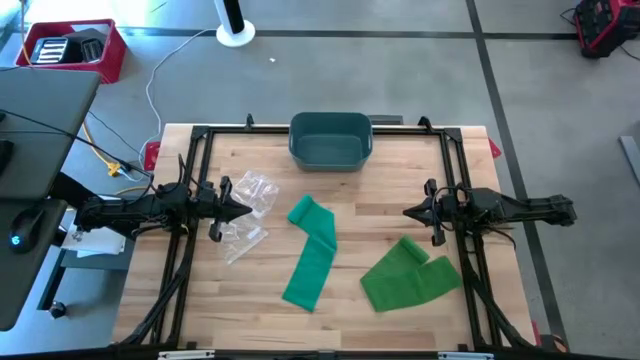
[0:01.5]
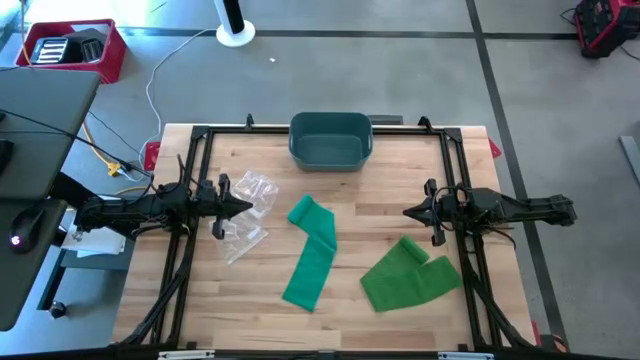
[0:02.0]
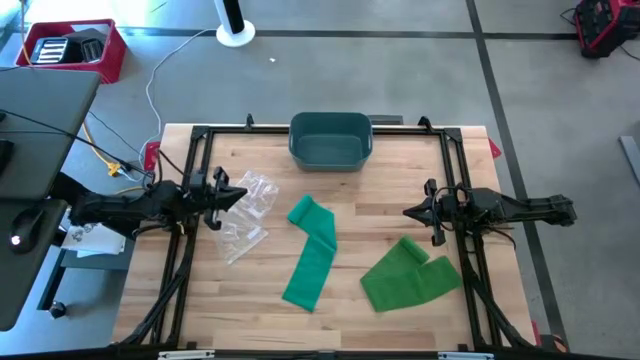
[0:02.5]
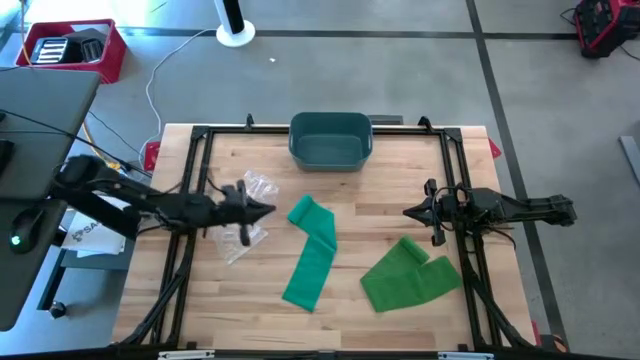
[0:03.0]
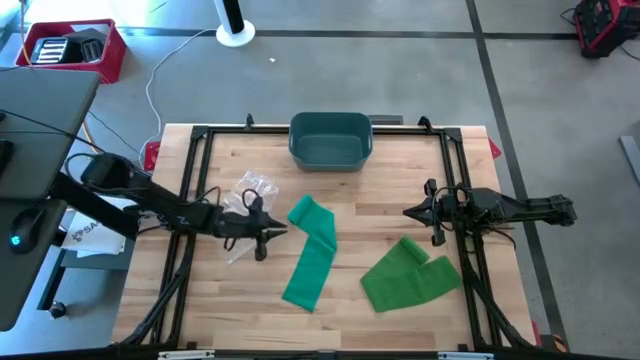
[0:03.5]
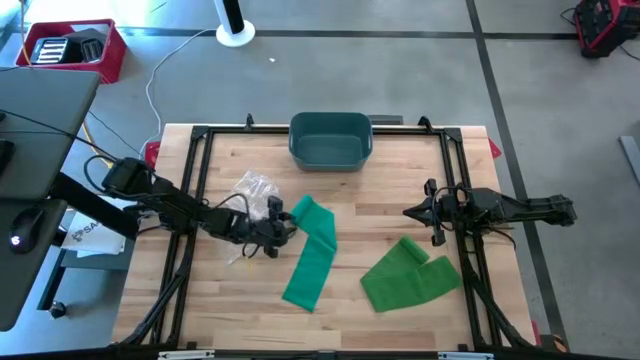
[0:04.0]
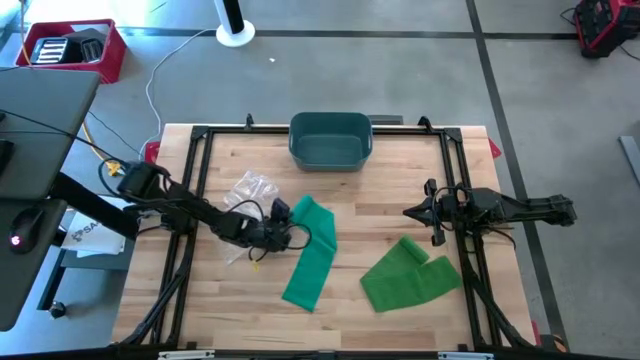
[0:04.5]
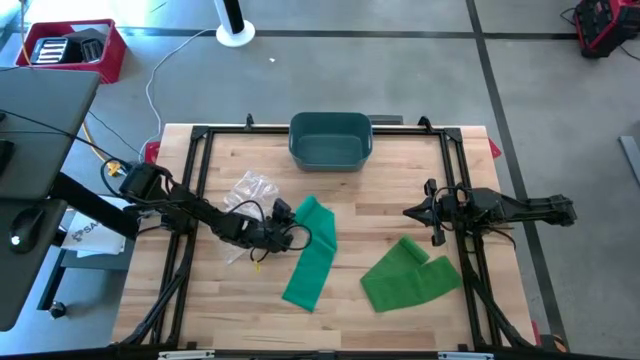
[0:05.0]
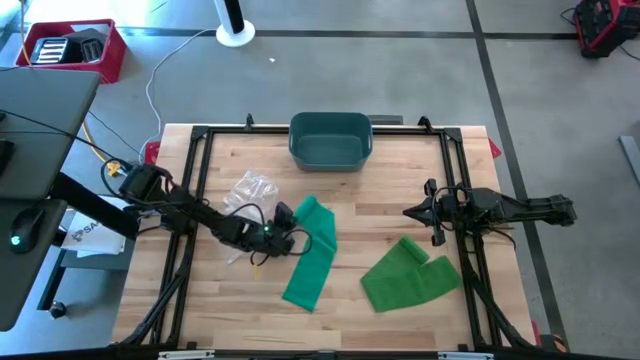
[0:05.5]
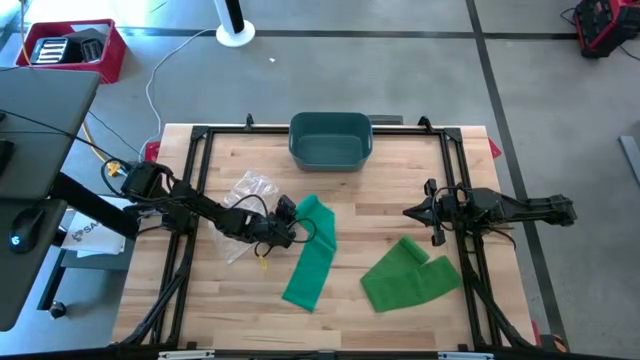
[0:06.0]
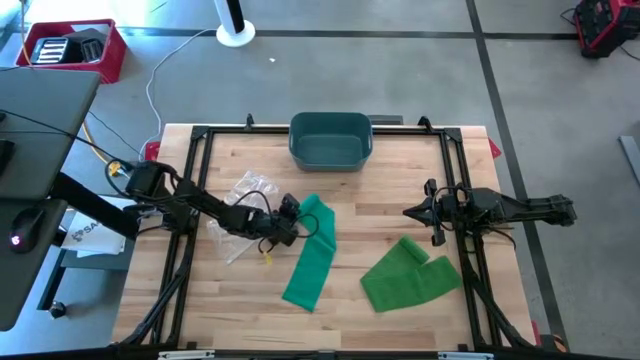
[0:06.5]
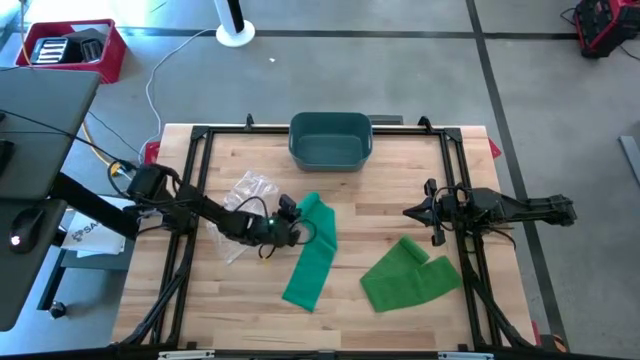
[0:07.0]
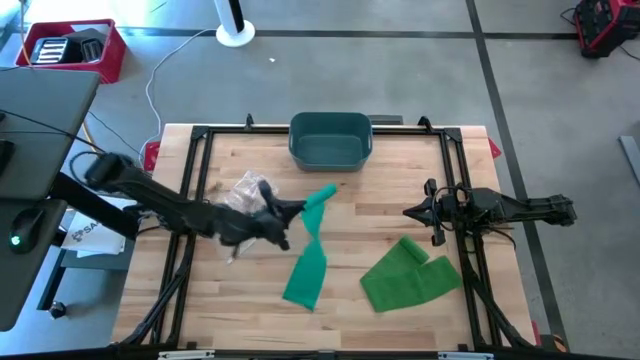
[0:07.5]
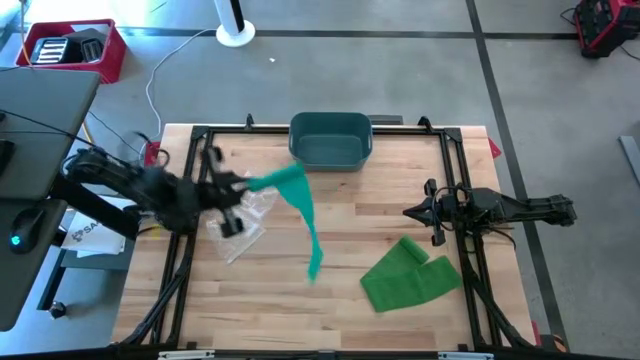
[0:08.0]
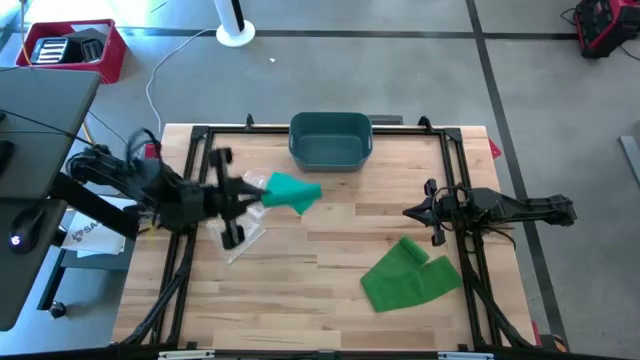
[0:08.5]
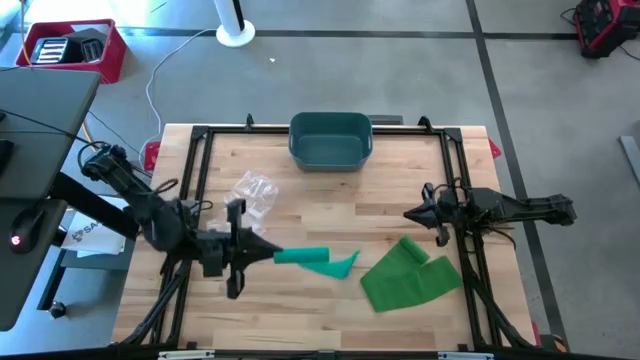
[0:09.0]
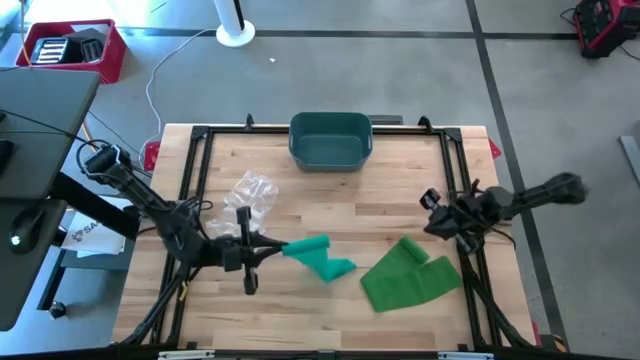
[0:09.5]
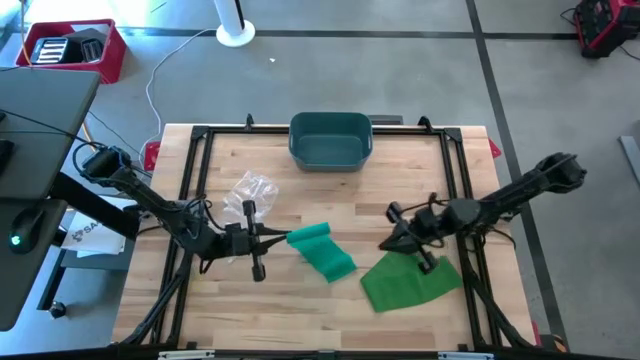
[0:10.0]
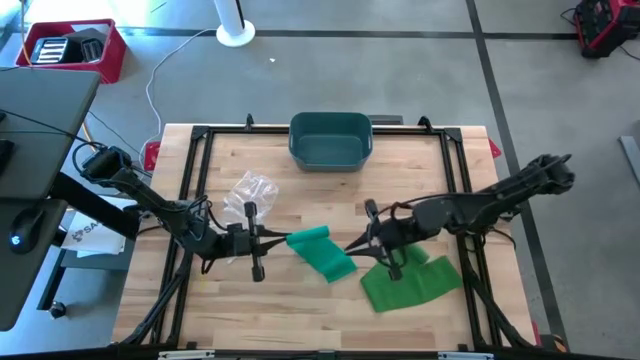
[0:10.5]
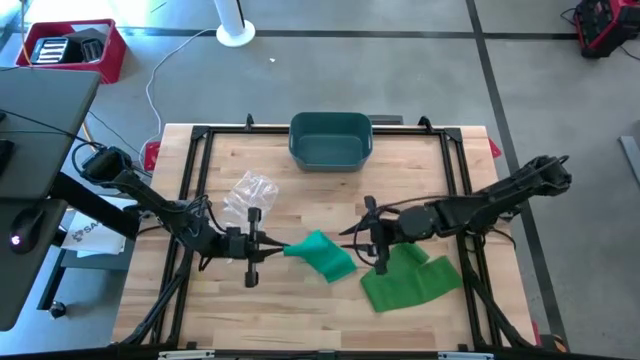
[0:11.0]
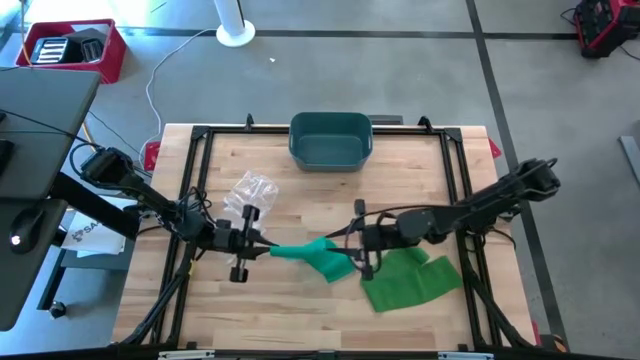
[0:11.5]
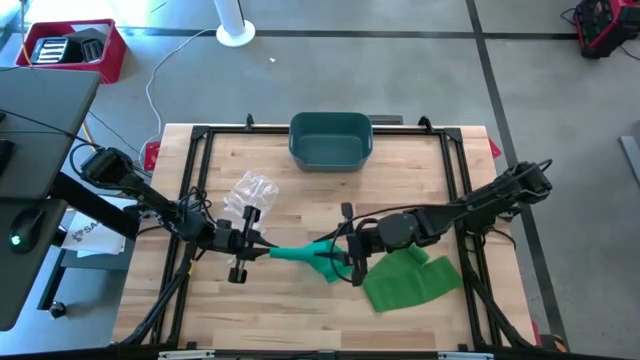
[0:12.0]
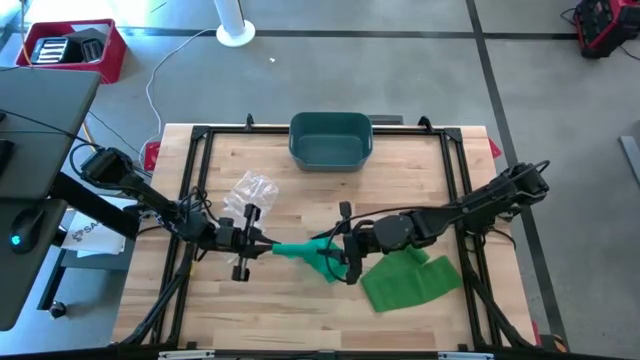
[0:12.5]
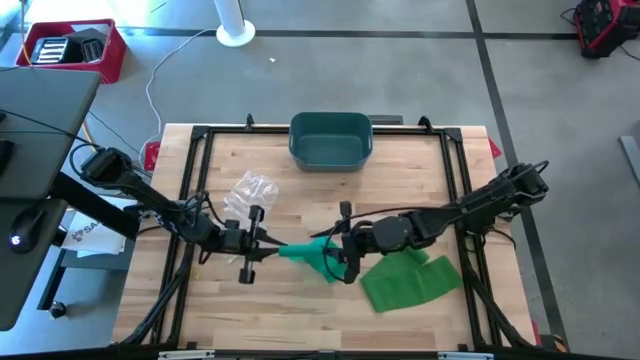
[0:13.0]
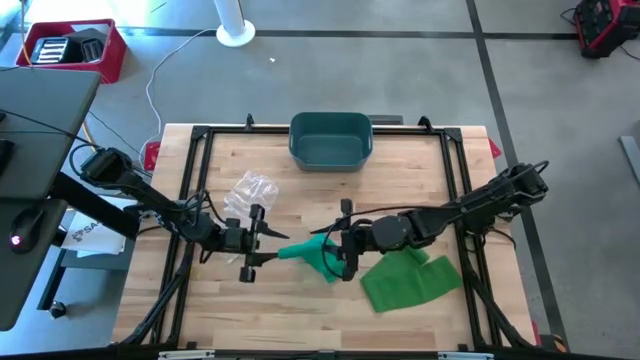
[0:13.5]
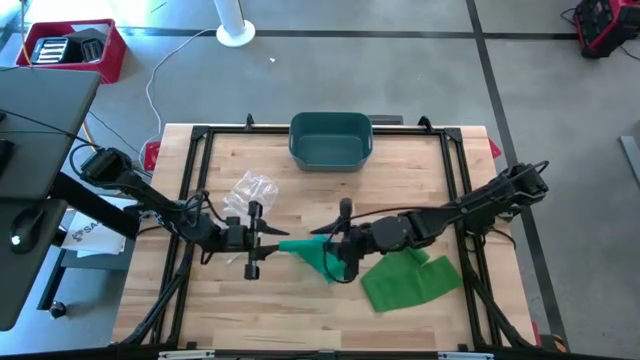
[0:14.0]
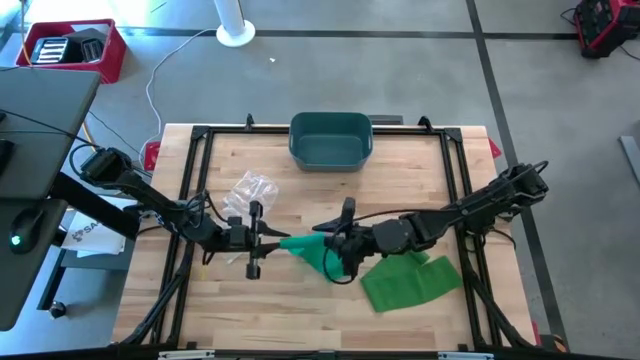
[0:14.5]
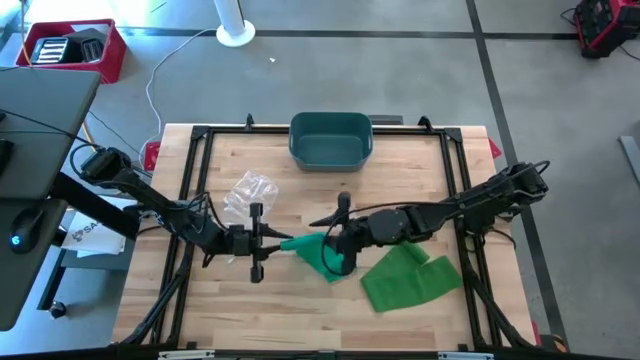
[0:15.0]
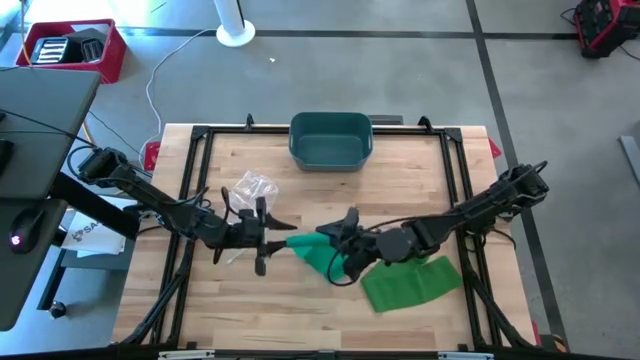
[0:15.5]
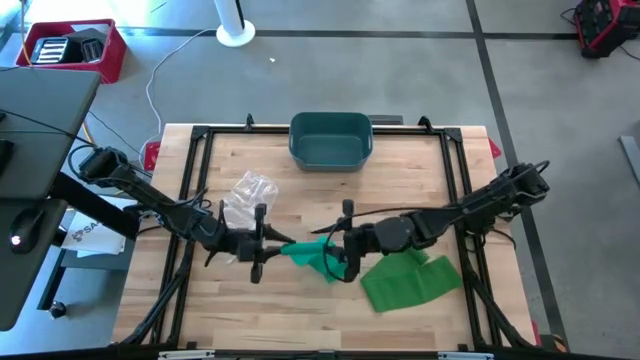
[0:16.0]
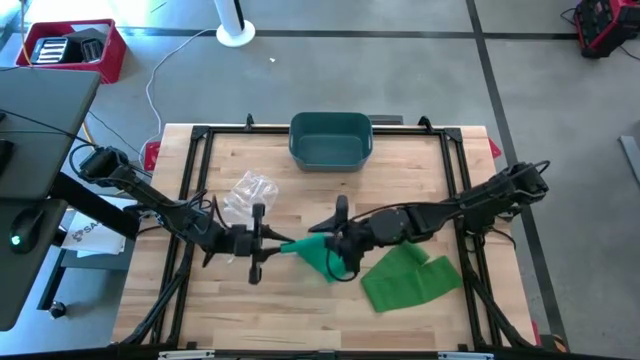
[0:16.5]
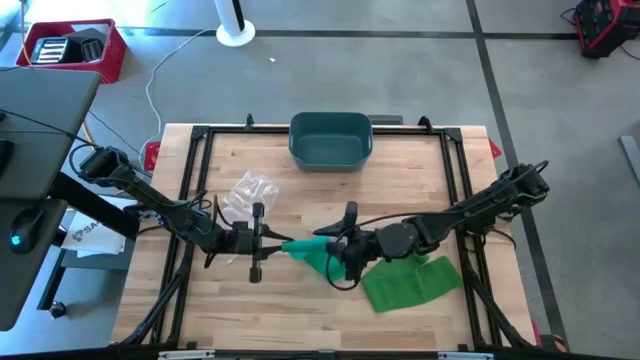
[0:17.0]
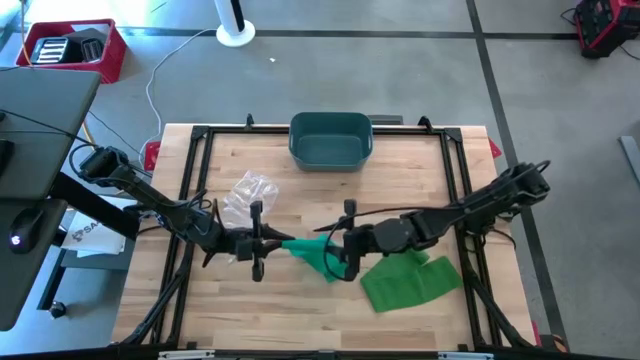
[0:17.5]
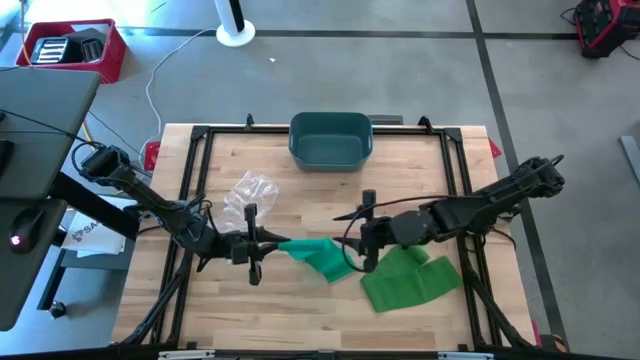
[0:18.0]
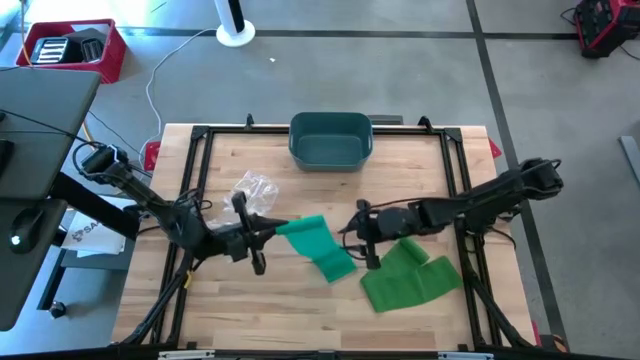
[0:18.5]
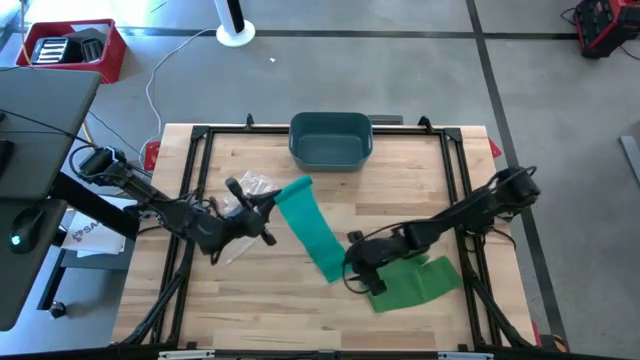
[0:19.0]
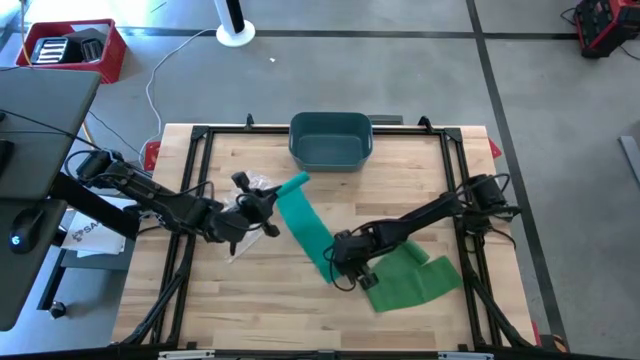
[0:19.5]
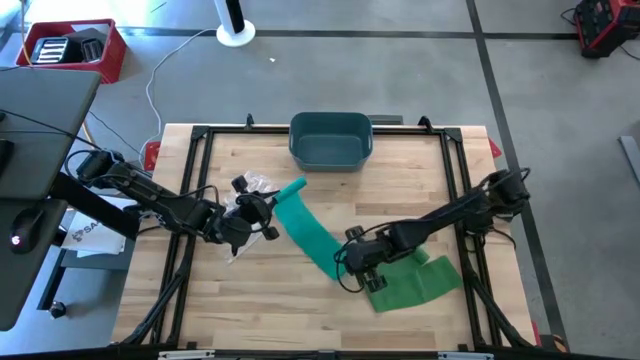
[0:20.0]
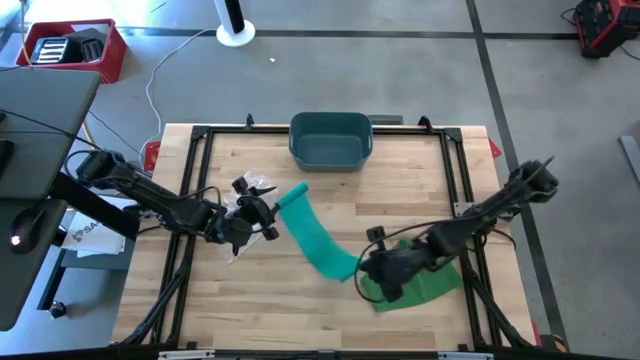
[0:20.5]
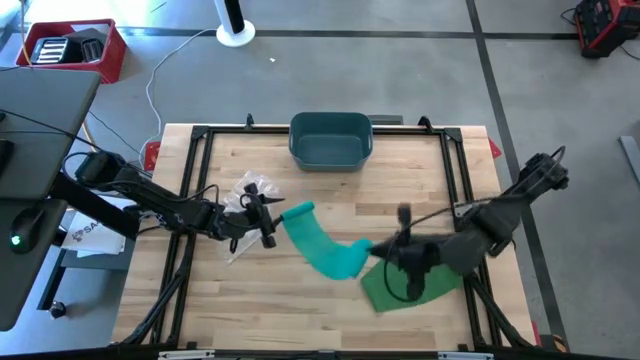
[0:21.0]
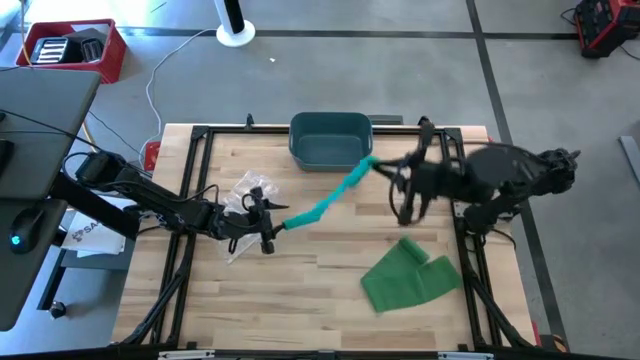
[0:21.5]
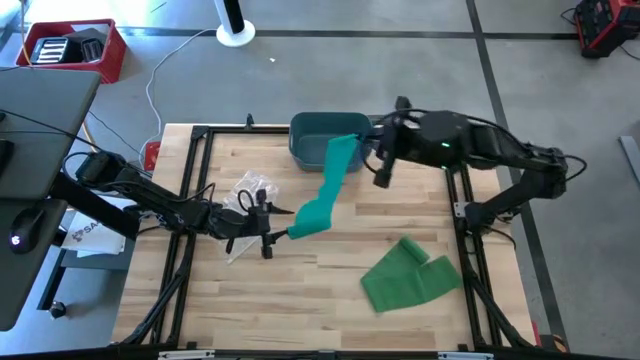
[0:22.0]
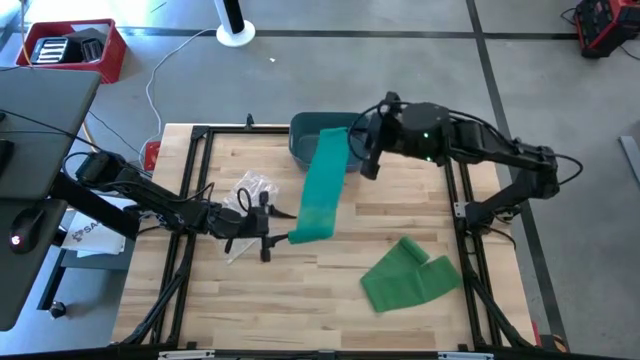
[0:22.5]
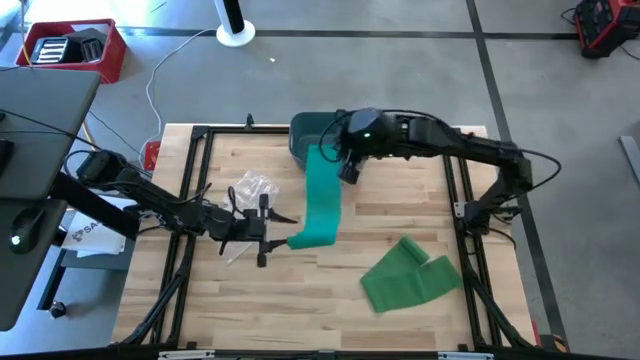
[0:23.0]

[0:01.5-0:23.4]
Task: Roll bandage
Roll the blue bandage
